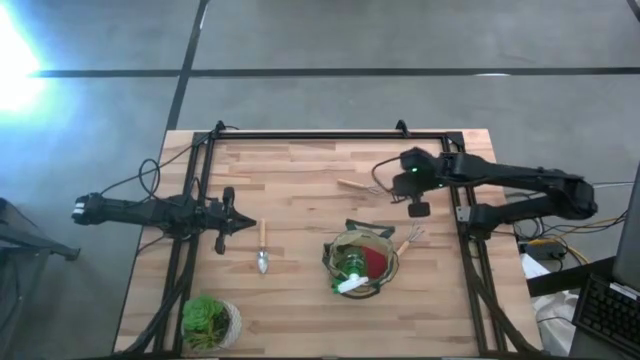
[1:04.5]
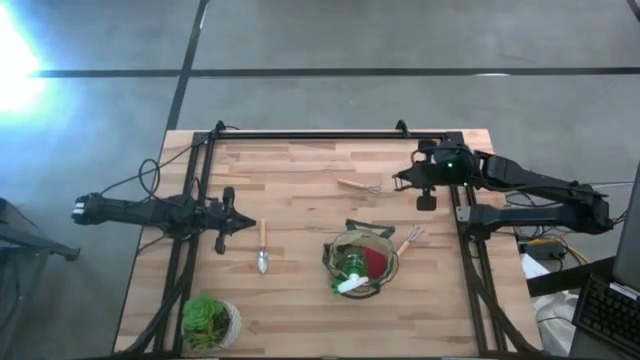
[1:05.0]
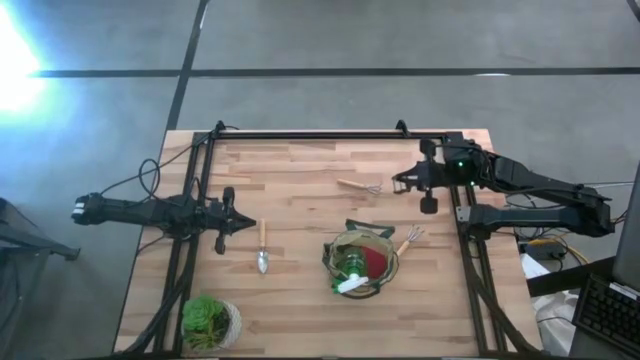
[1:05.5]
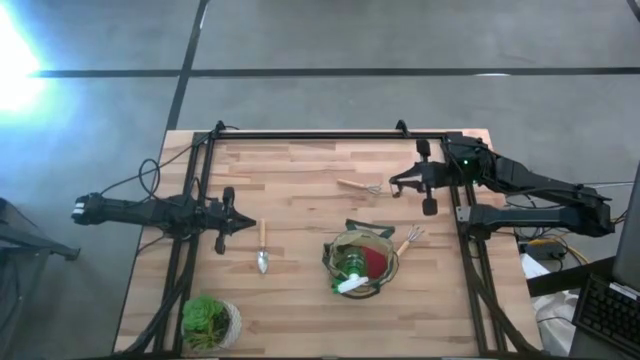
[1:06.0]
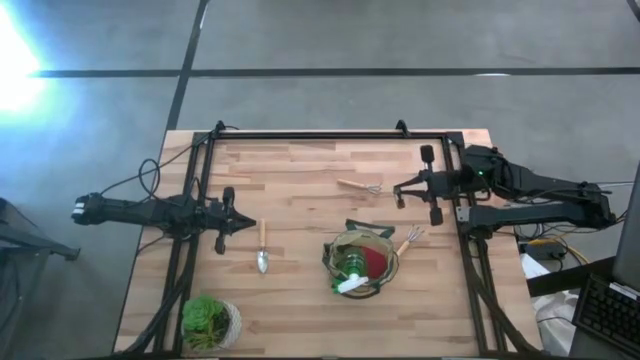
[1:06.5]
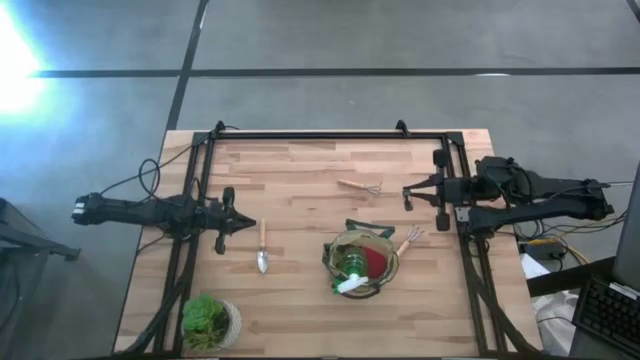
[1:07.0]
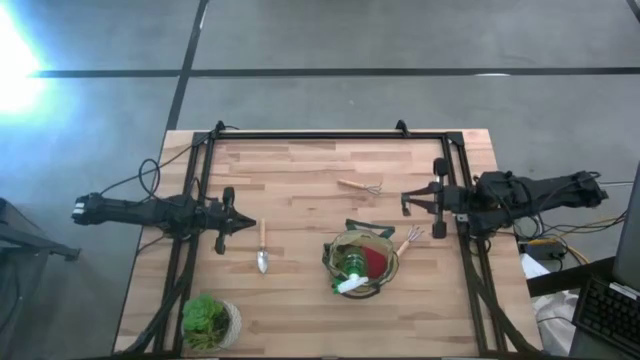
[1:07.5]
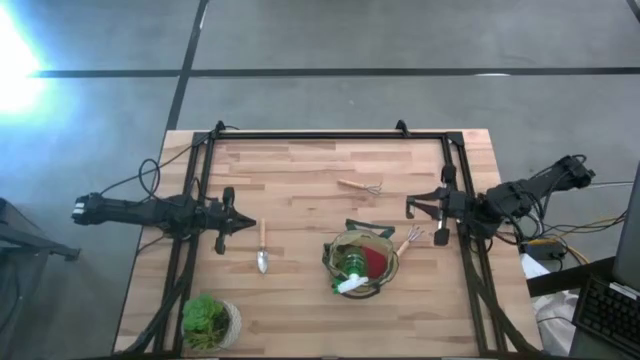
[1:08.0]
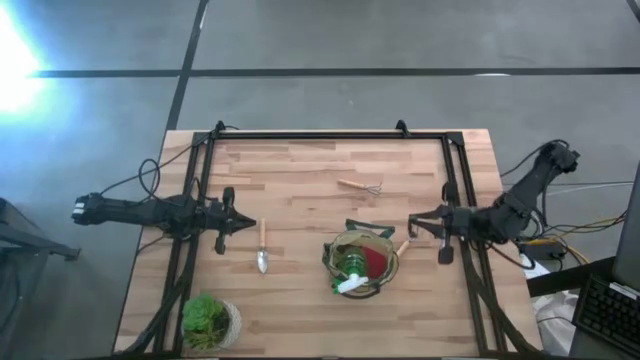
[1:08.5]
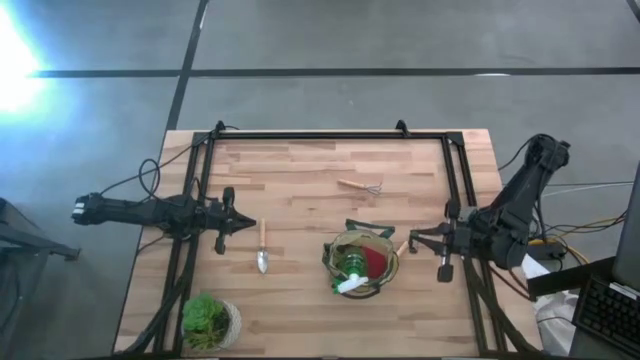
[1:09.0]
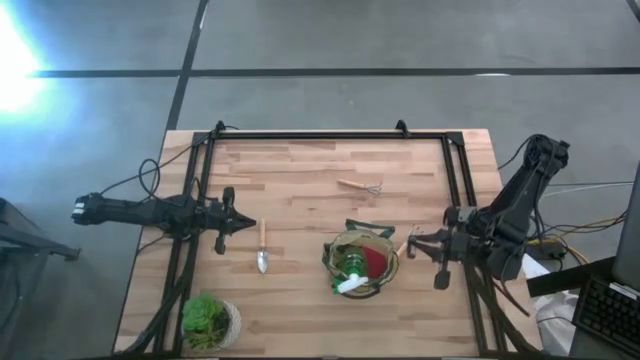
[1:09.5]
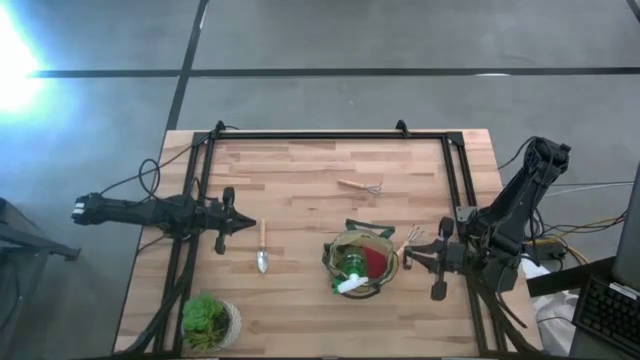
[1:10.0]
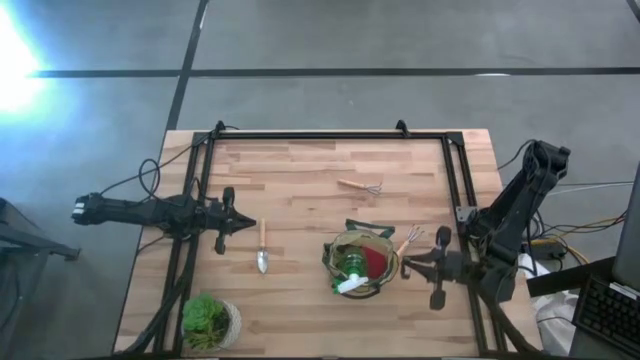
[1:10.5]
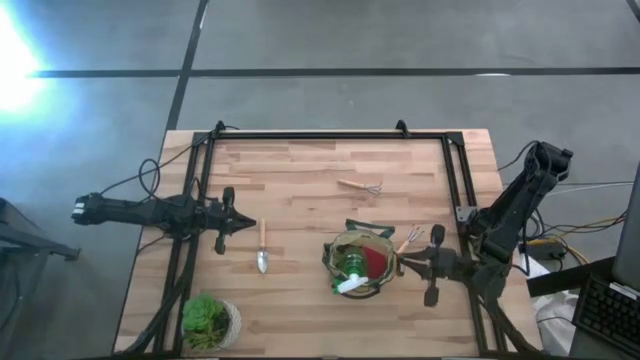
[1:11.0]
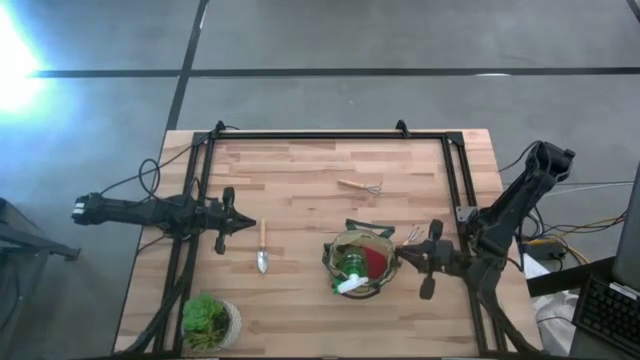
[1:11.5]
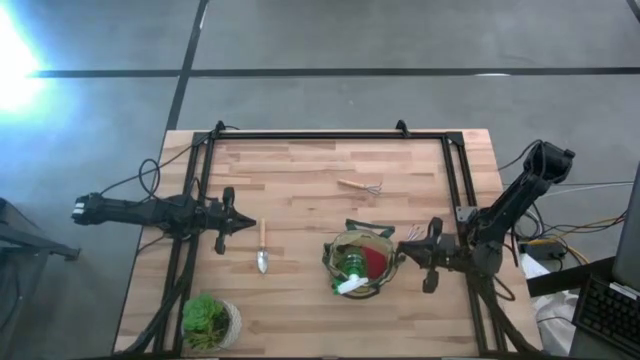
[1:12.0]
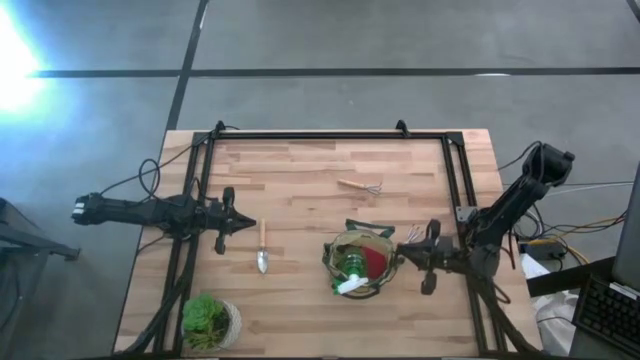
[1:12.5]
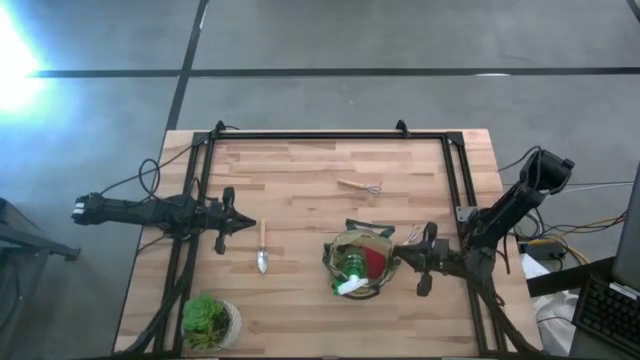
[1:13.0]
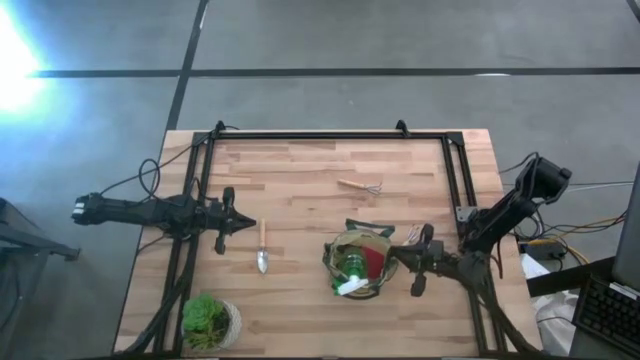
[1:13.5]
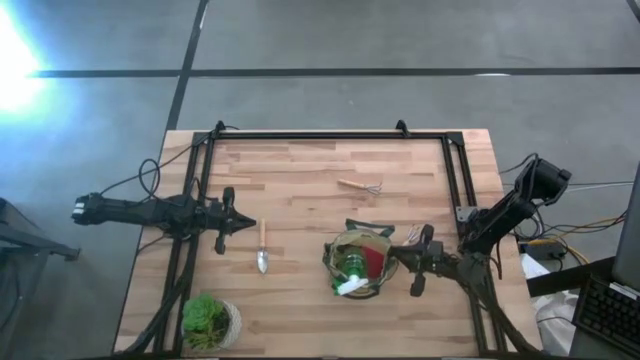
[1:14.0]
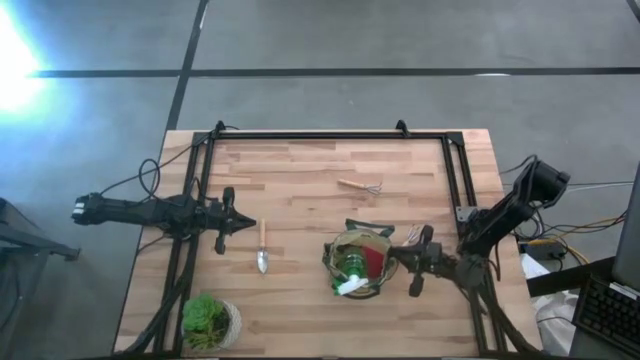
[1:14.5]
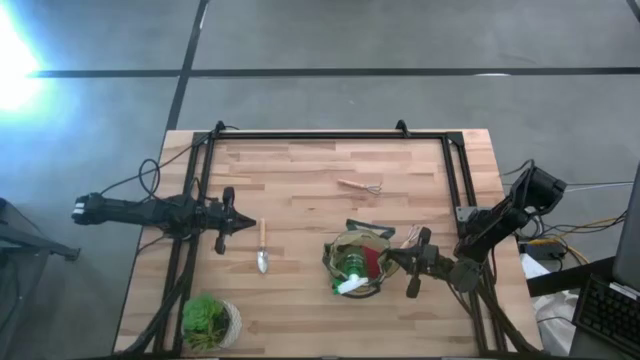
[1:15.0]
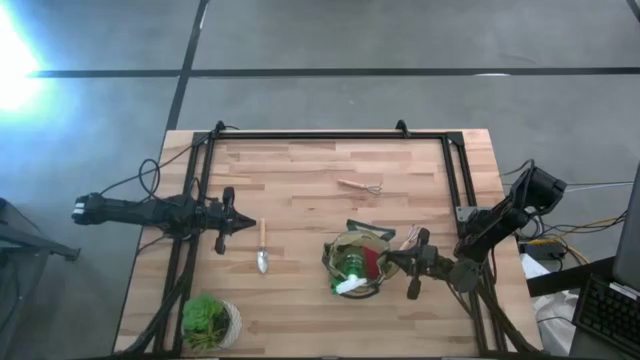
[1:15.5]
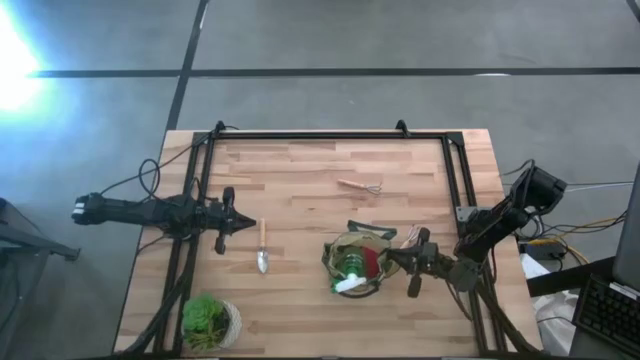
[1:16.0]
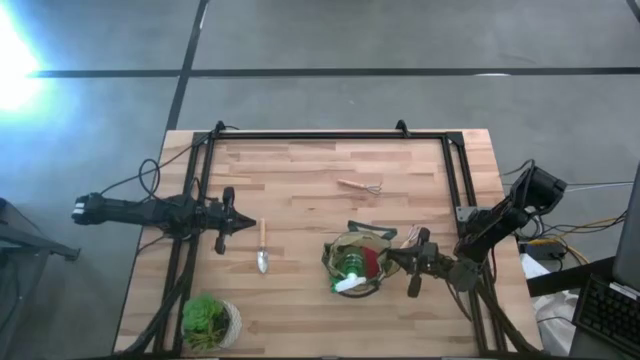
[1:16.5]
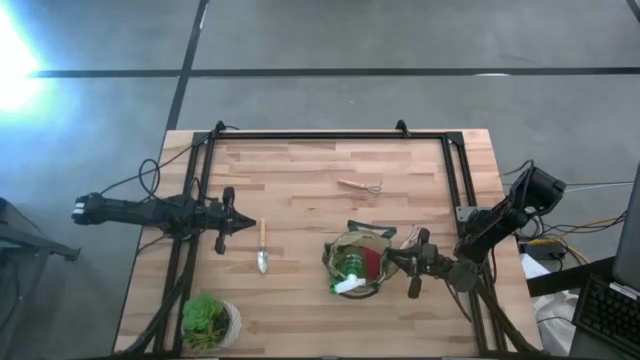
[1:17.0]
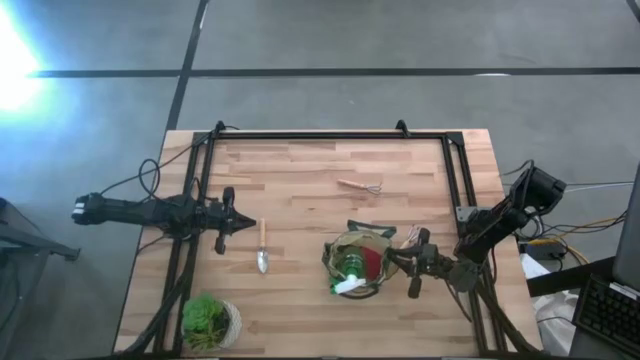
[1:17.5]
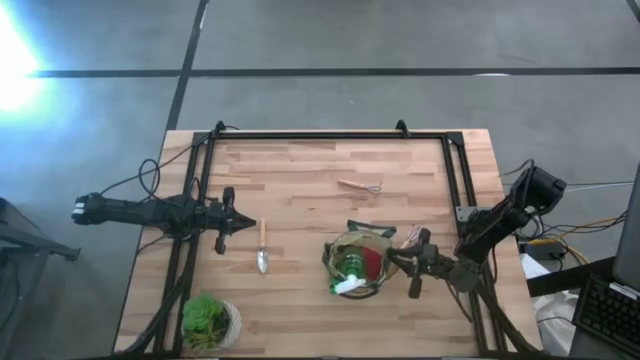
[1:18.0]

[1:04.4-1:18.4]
Task: Pick & Place Garden tools in Gardening bag
Put the shear scissors into the side pocket of the gardening bag
